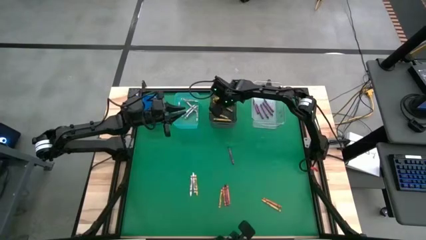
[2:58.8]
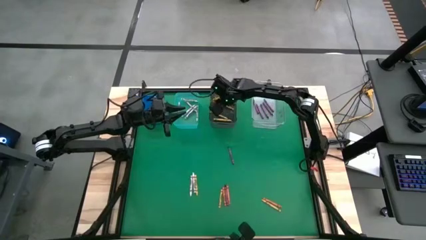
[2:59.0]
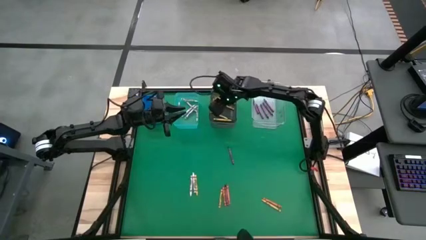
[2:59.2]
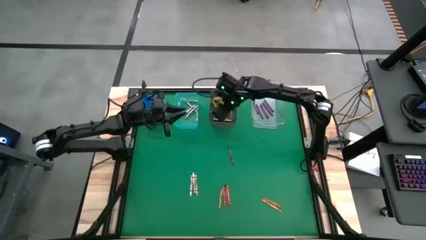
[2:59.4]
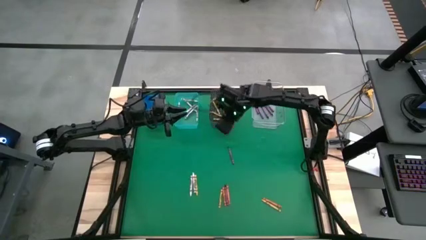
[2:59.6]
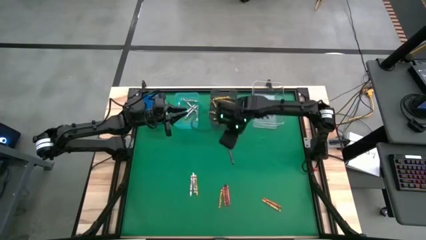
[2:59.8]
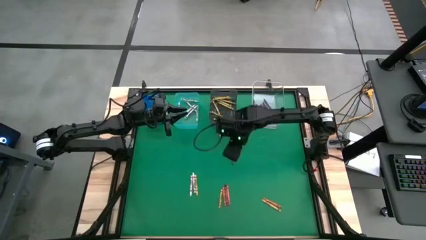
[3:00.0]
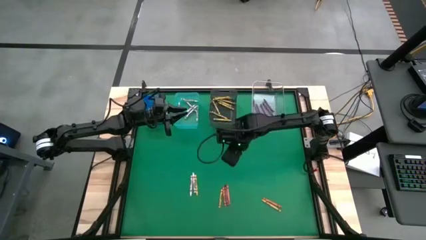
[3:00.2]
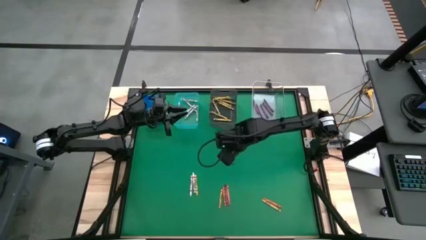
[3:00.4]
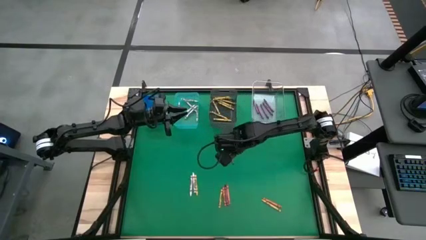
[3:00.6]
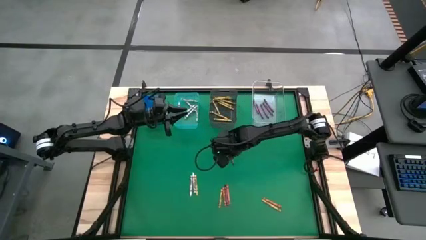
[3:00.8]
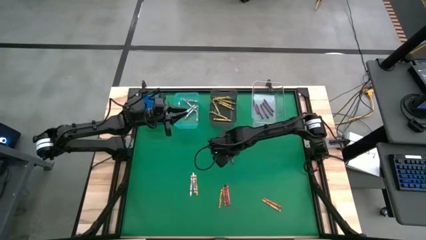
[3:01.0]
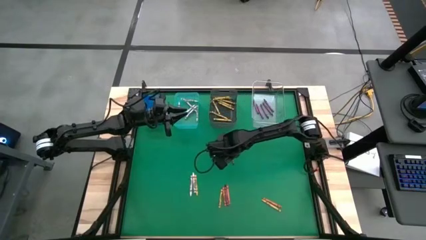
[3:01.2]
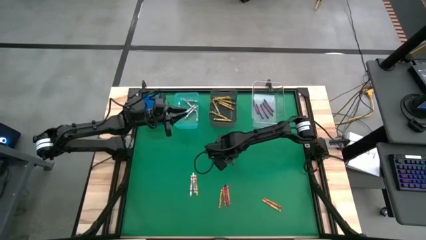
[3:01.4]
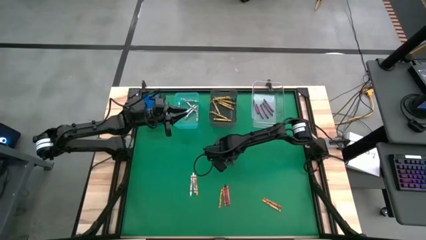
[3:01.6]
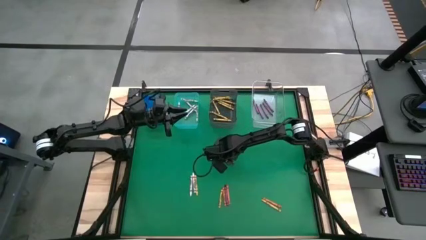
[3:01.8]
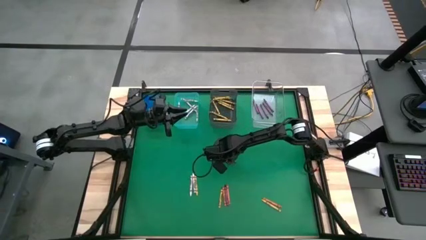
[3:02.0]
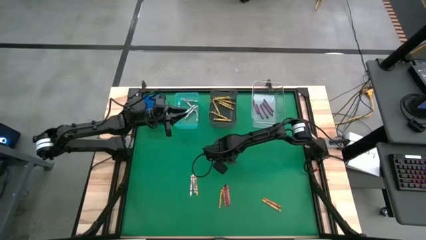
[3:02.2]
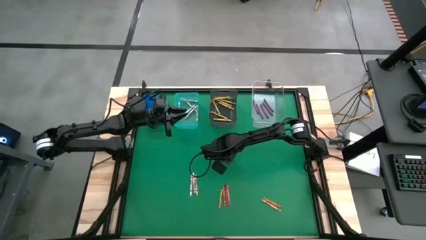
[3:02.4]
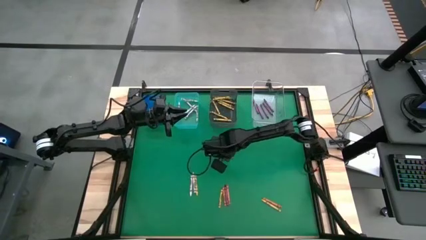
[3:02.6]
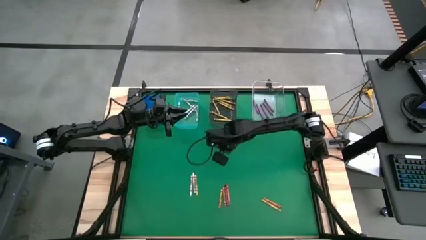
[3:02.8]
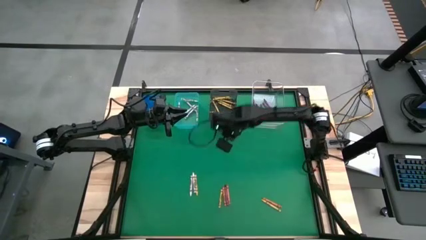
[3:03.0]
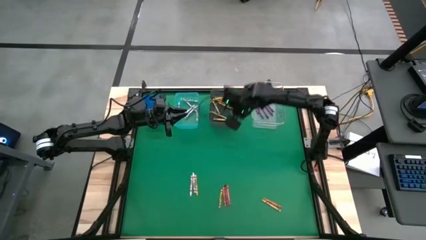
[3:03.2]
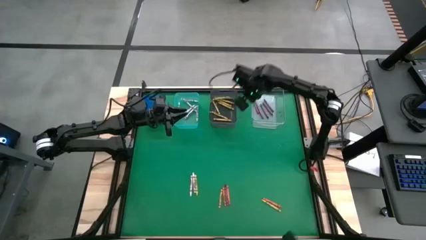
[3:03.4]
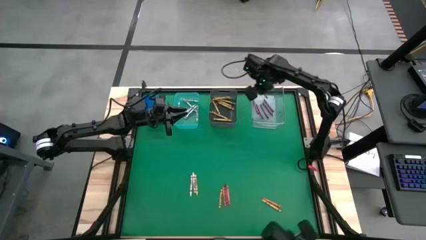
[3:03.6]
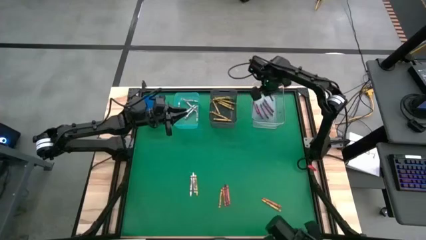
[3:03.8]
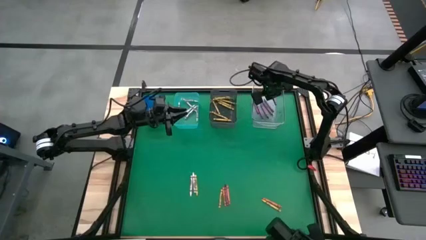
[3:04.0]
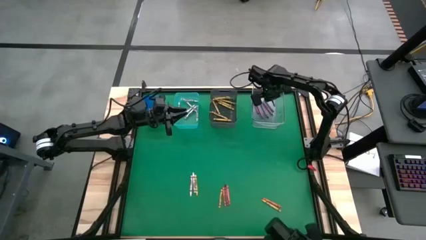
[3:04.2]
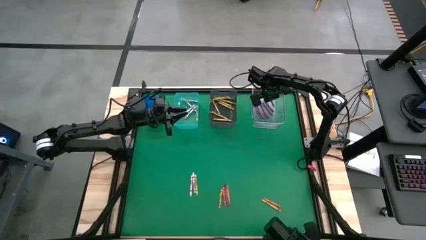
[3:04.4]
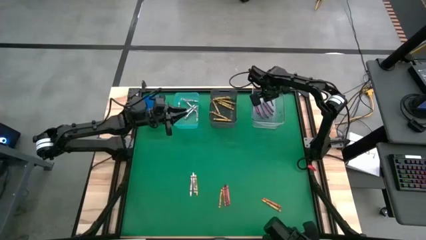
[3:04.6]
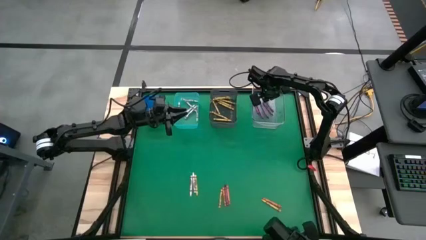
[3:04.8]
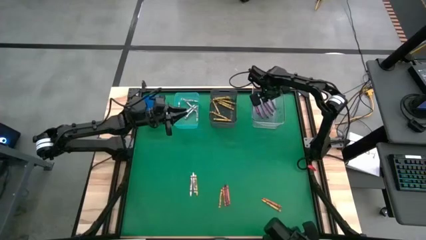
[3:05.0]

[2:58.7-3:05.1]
Task: Sort crayons
Put the violet crayon into the transparent bin

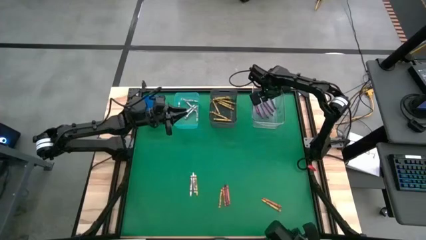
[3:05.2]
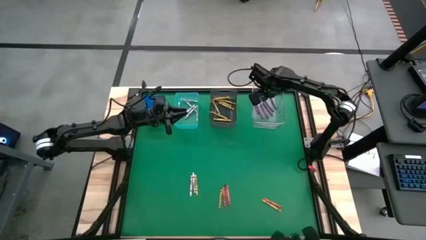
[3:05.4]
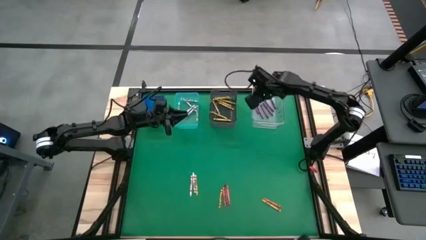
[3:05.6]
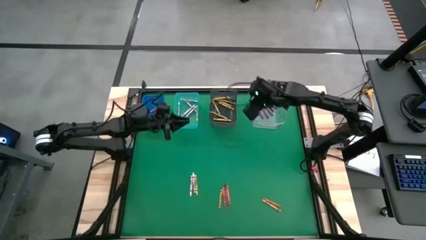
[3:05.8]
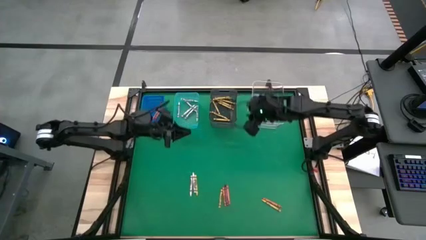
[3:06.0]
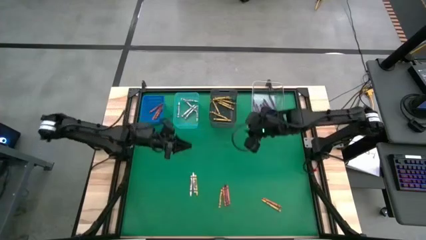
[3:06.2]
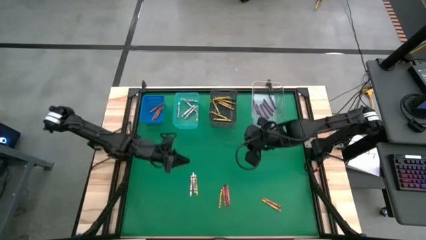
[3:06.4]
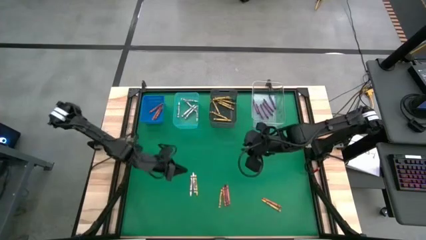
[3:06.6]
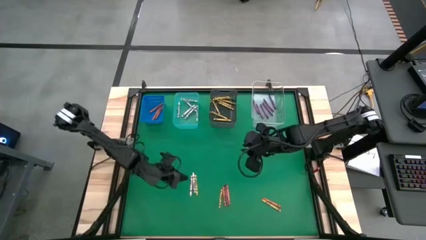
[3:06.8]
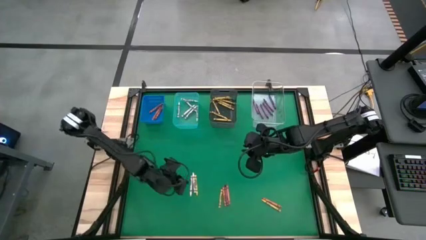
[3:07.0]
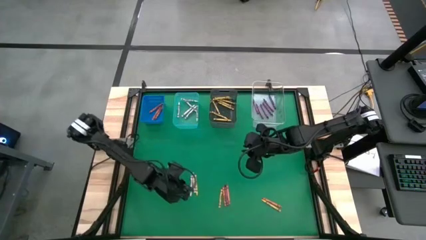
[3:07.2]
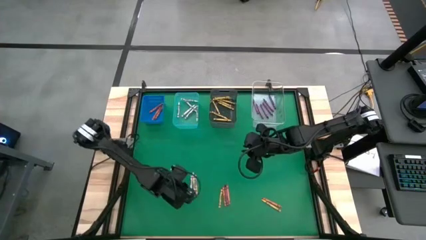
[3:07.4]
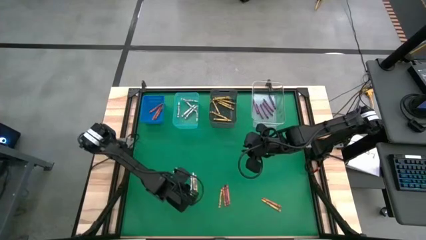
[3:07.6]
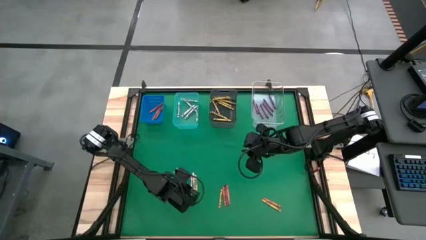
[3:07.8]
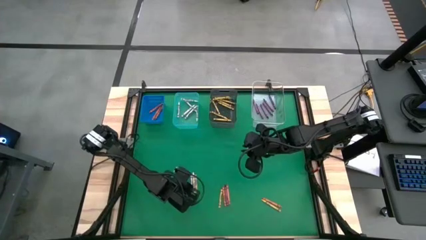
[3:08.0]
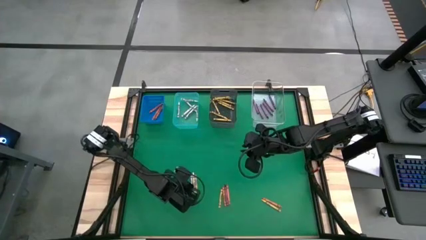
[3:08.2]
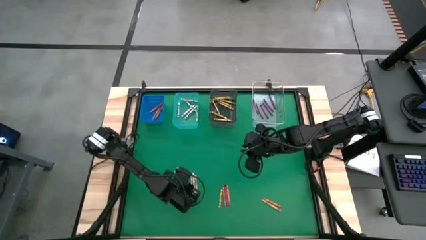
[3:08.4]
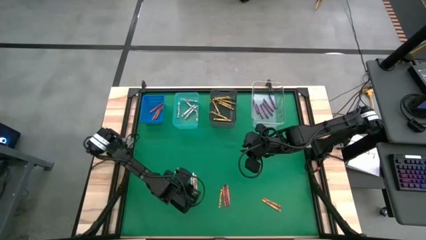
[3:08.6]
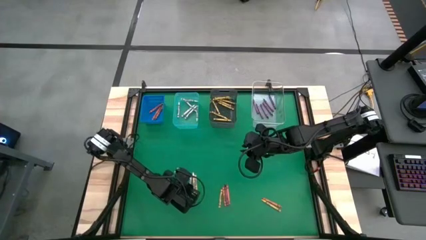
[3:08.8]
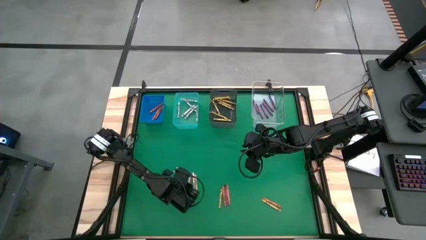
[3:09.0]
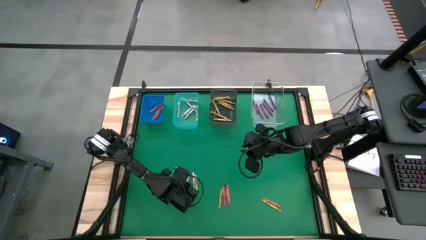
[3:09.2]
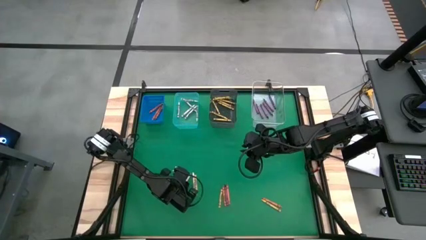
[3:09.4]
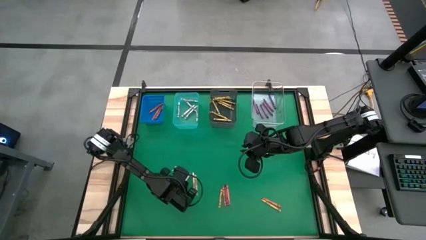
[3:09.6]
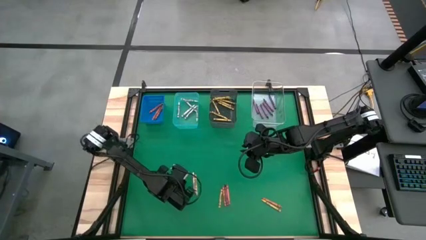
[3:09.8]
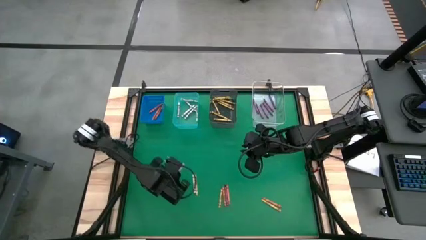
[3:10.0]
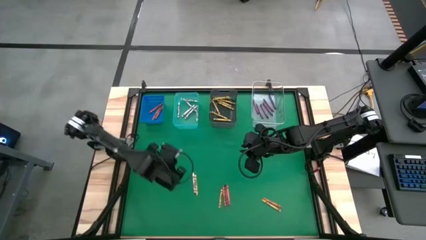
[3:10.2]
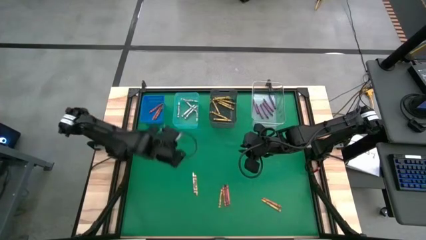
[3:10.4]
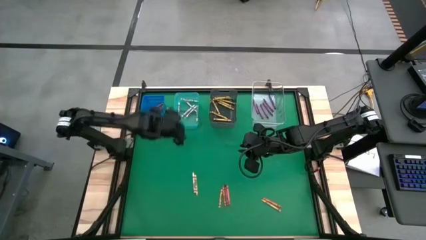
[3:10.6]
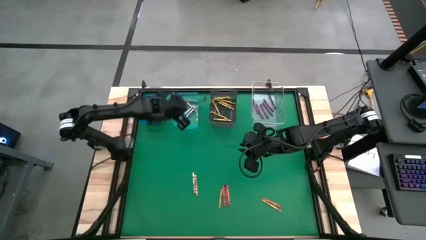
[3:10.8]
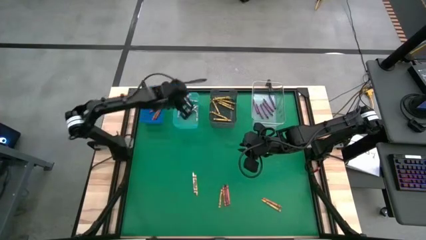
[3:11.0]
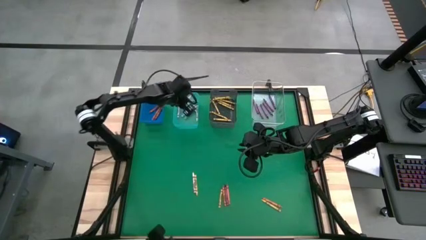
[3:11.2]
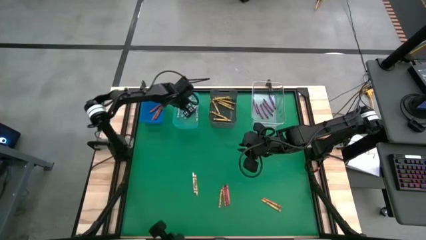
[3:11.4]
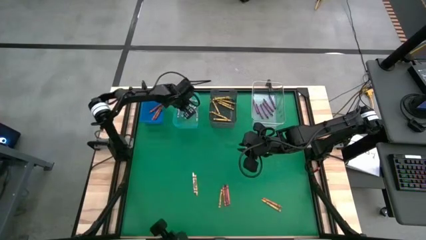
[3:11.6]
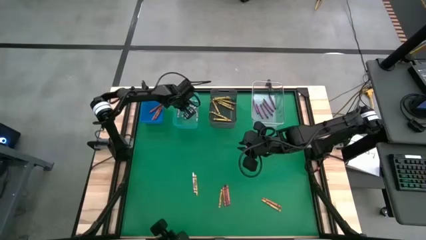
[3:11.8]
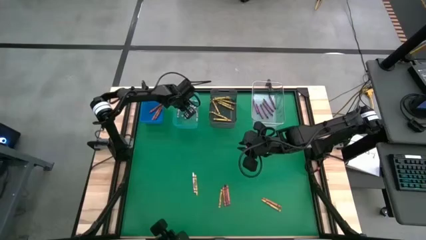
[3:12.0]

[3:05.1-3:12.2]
Put the white crayon into the light blue bin
